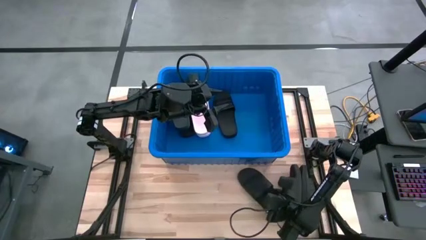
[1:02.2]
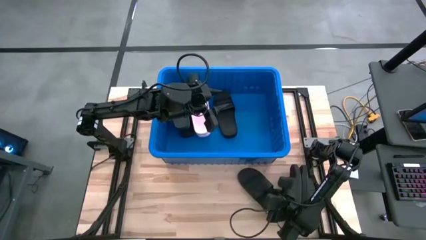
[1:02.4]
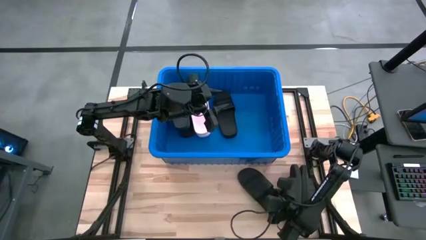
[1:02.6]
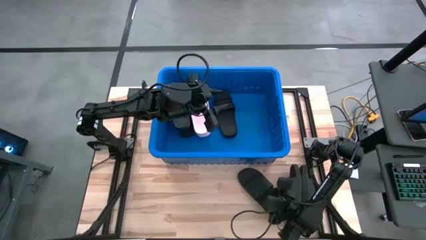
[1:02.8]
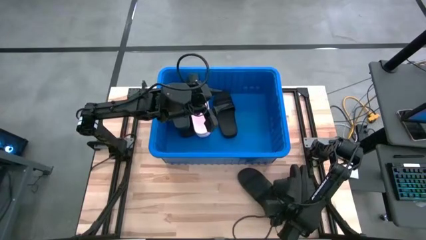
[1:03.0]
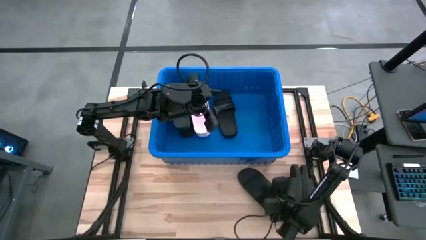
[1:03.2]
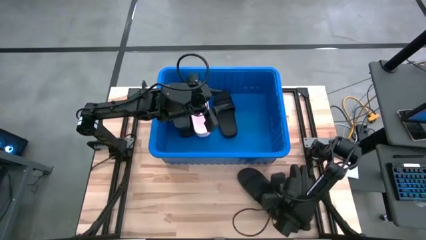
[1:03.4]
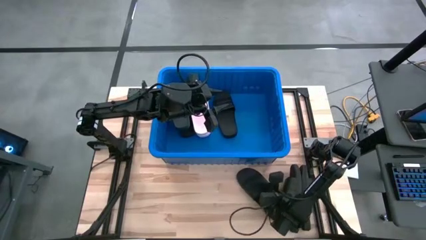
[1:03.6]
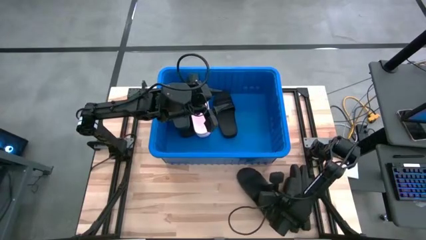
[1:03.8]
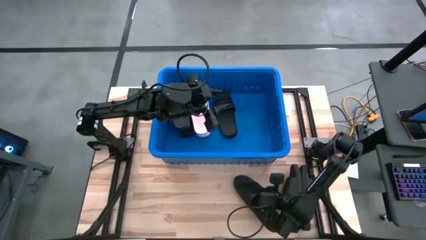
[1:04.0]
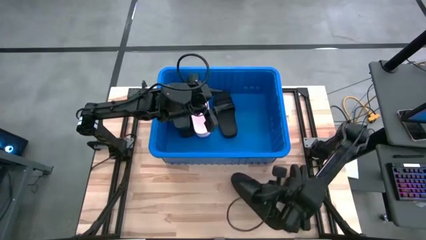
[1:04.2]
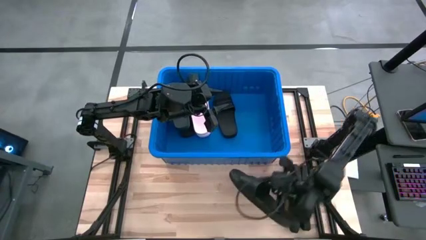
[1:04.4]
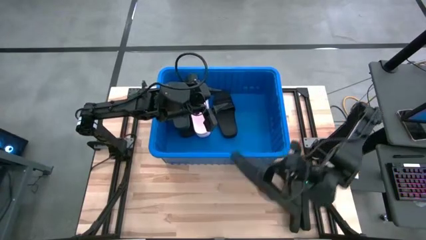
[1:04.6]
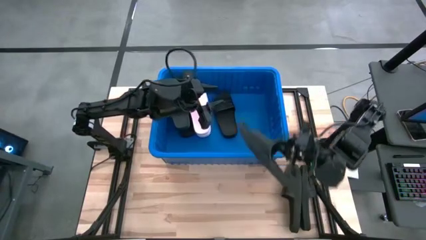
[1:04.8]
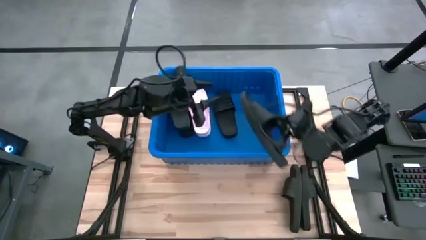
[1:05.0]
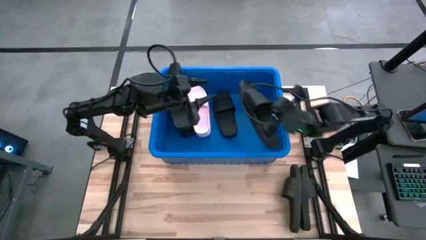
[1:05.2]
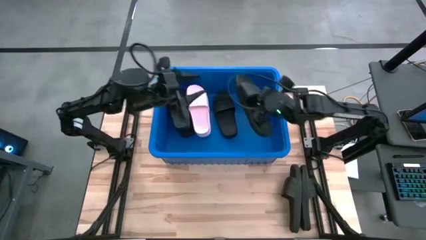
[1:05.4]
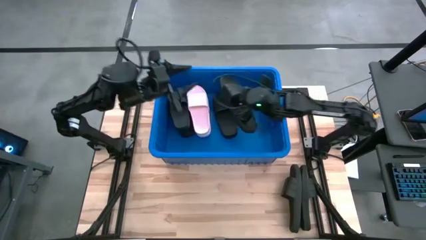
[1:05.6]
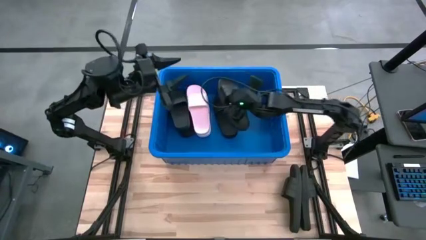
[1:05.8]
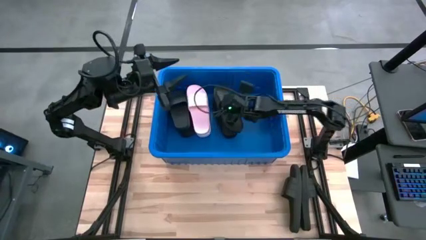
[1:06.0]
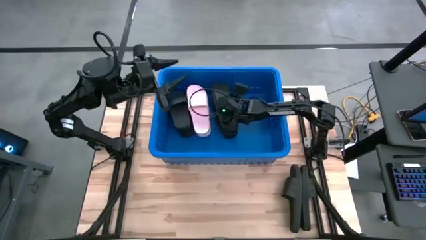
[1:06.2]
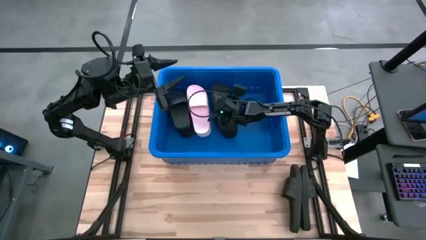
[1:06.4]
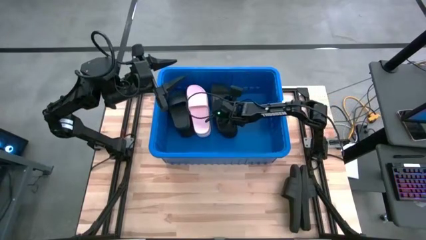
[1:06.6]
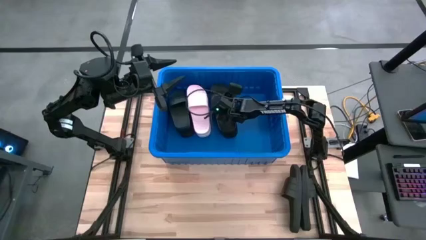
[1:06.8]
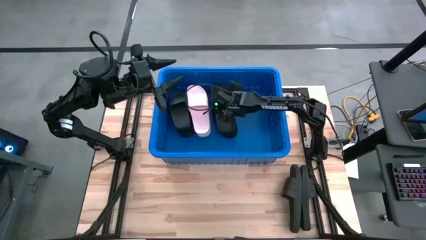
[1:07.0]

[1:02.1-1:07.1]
Task: Pick and place slides into bin
Put the left black slide into the bin

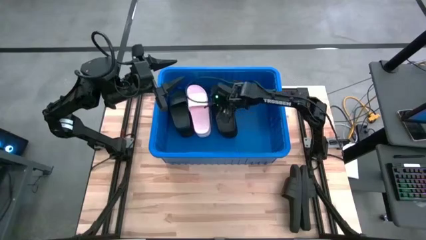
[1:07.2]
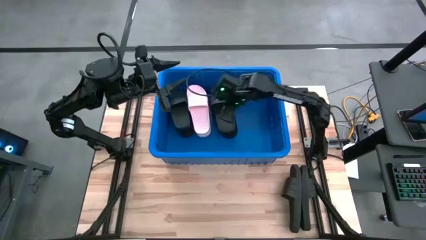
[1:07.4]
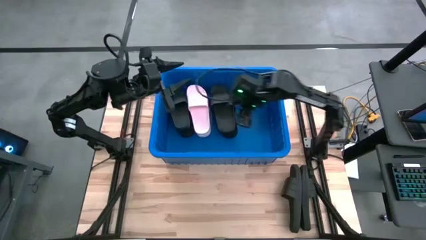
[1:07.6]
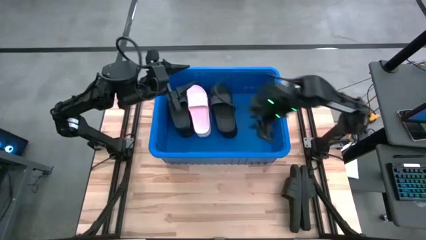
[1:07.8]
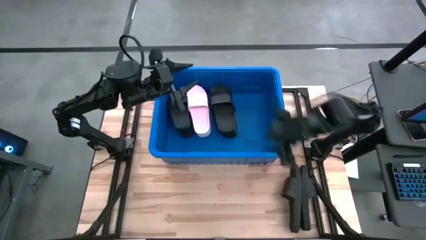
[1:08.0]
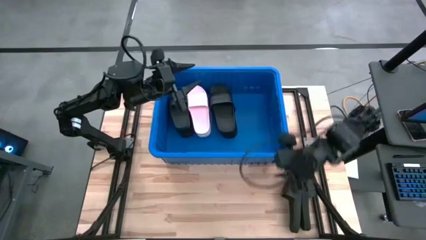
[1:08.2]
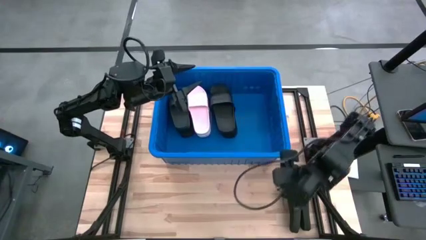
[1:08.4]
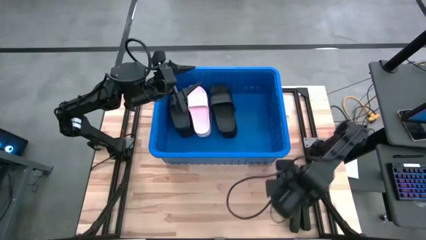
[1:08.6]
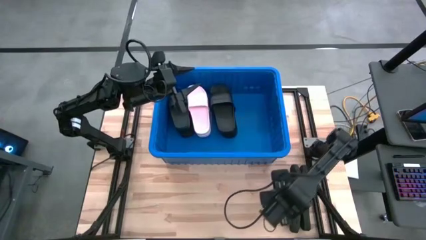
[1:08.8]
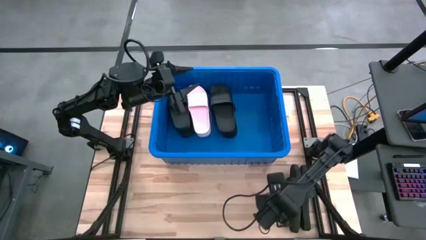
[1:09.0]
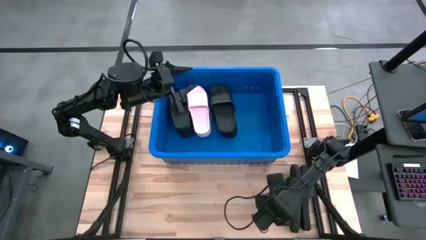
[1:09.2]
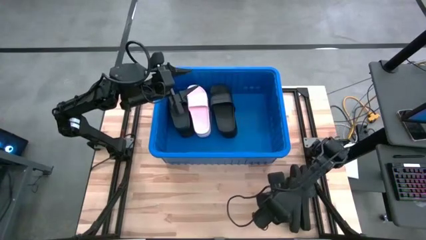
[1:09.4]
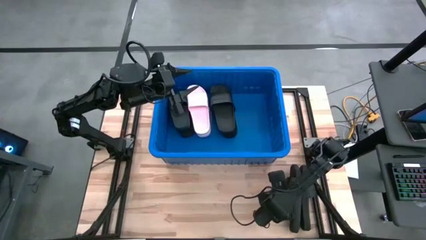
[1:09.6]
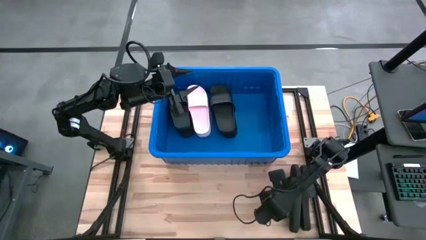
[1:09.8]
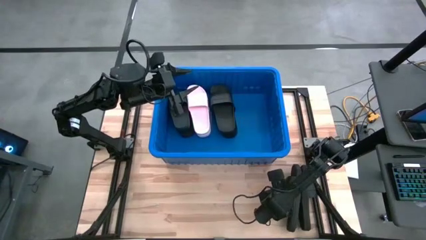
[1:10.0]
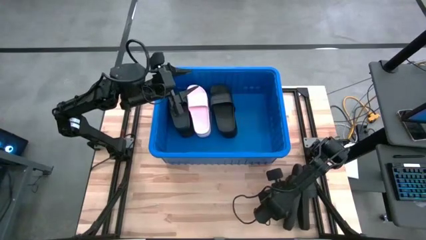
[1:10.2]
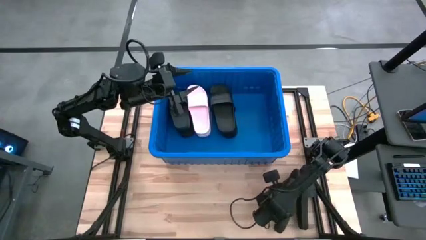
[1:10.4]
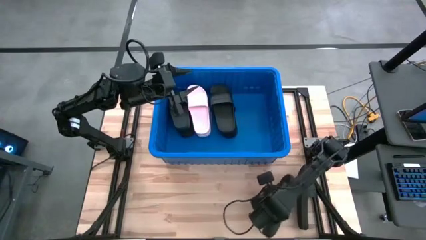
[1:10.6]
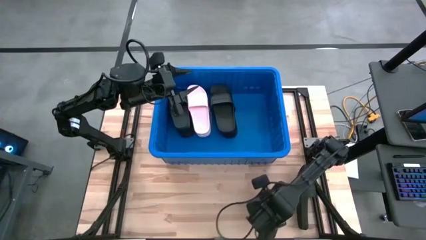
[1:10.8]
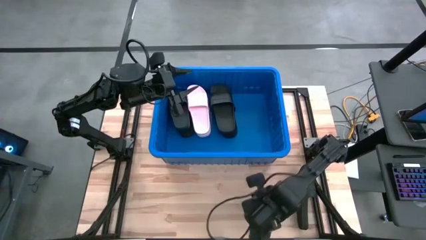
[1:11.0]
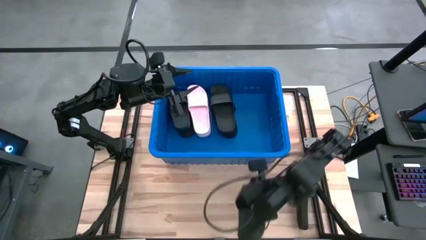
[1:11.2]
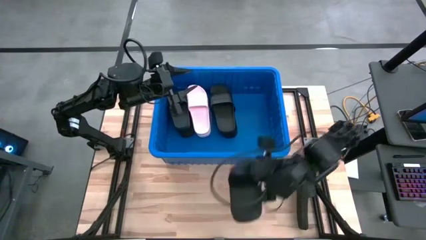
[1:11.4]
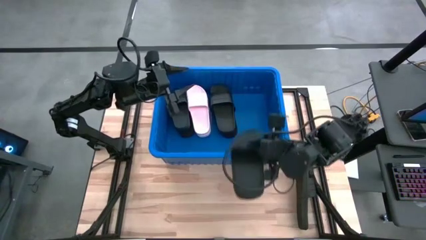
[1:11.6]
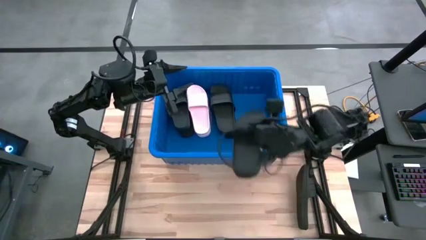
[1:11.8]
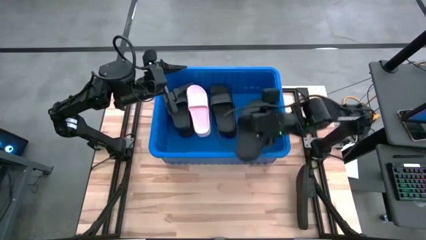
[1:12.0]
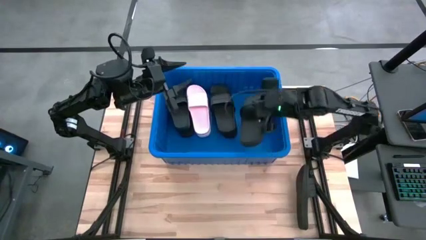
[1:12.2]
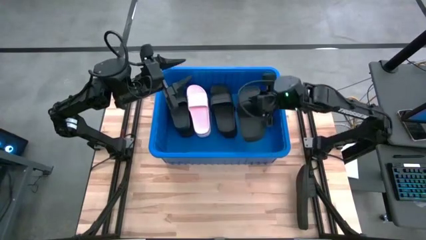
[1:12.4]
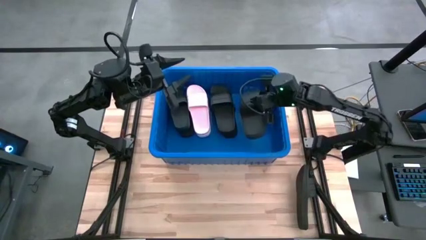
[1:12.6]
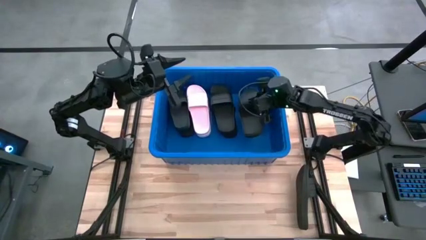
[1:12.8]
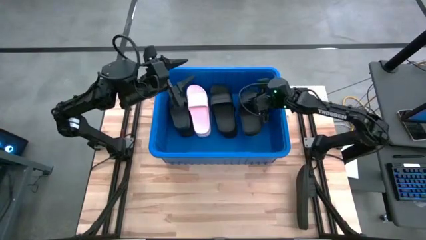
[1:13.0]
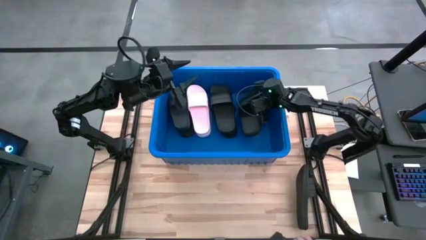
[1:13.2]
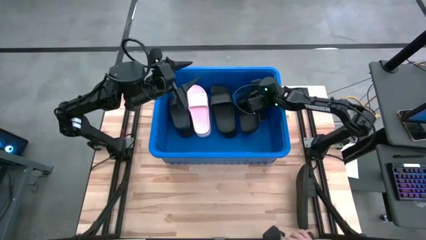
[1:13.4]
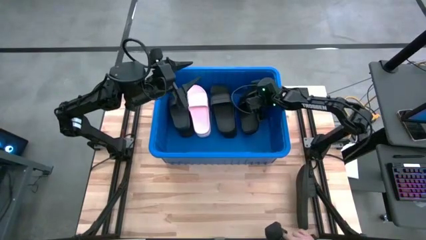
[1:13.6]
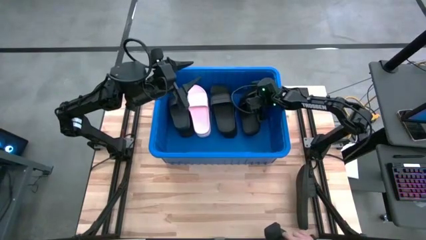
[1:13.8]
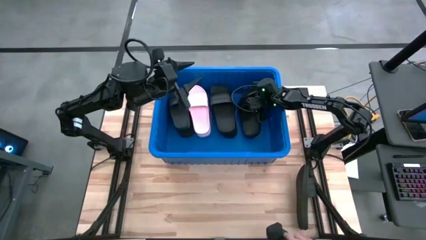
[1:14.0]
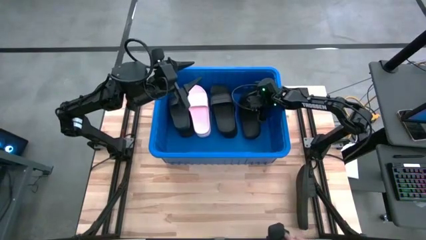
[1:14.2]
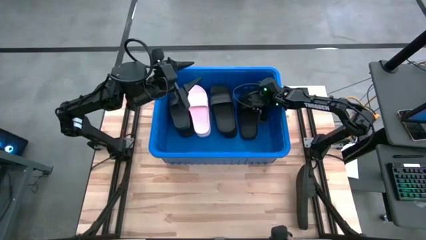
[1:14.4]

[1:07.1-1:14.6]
Put the left black slide into the bin

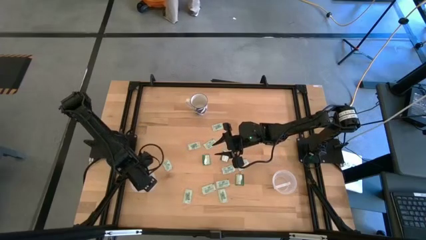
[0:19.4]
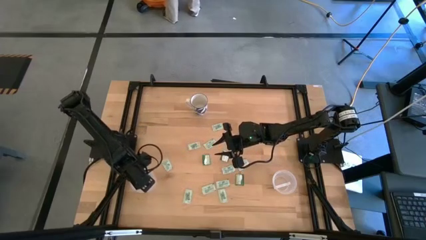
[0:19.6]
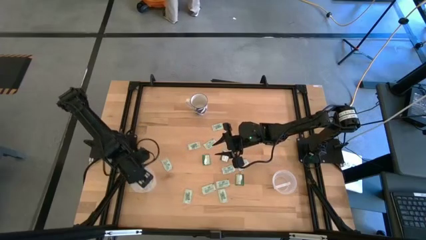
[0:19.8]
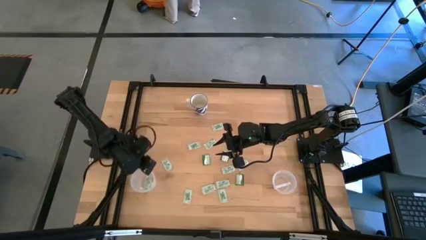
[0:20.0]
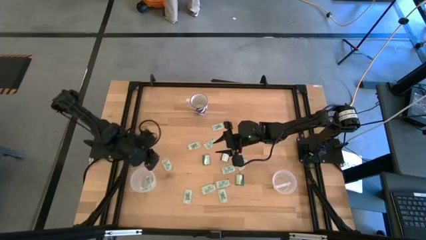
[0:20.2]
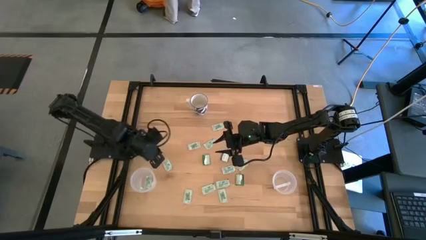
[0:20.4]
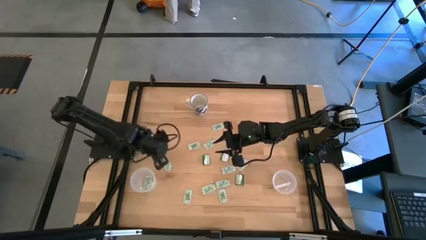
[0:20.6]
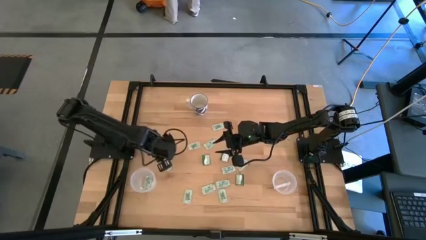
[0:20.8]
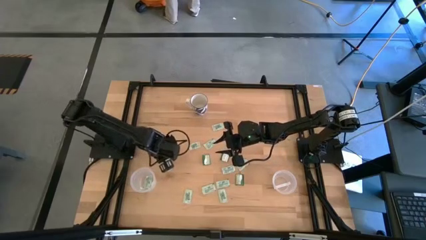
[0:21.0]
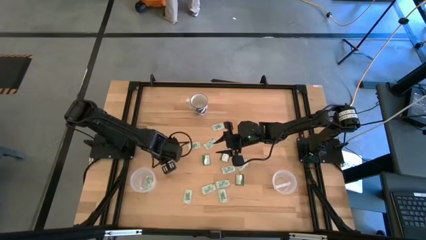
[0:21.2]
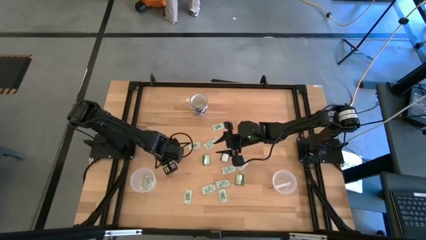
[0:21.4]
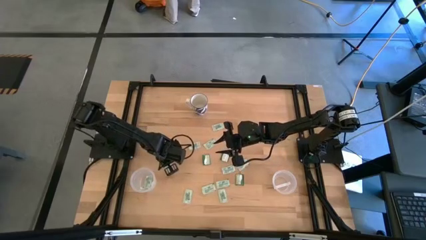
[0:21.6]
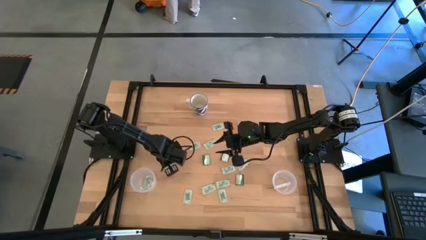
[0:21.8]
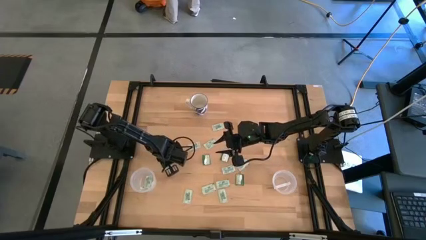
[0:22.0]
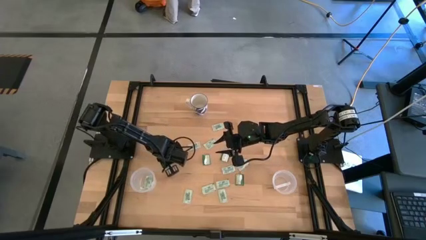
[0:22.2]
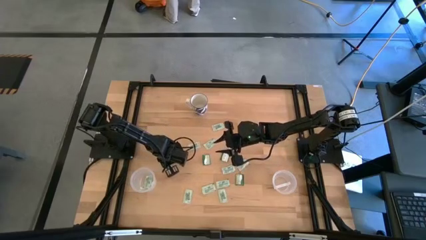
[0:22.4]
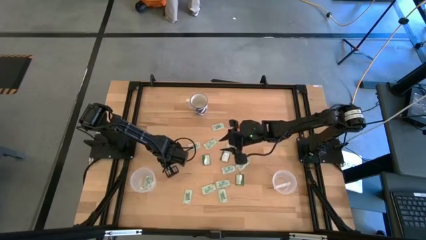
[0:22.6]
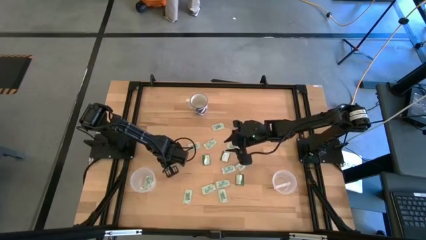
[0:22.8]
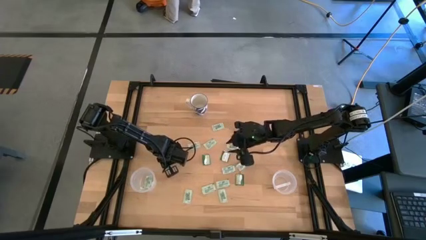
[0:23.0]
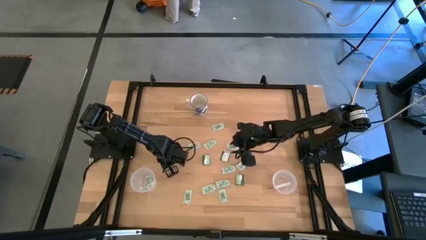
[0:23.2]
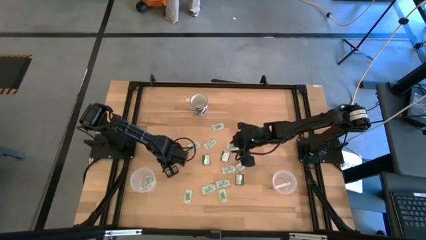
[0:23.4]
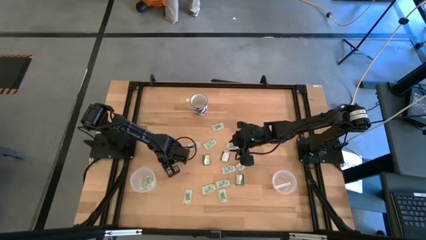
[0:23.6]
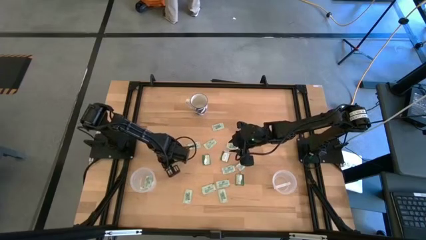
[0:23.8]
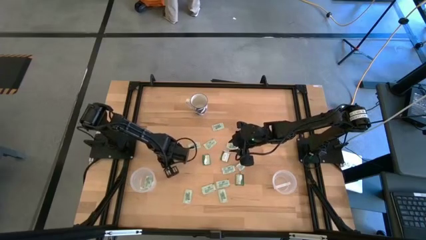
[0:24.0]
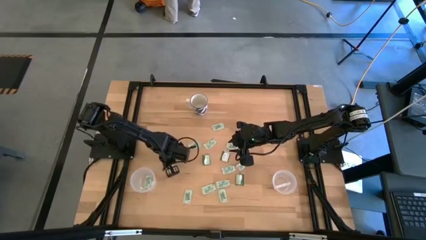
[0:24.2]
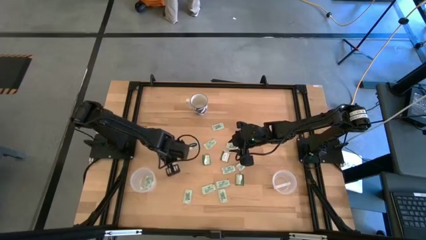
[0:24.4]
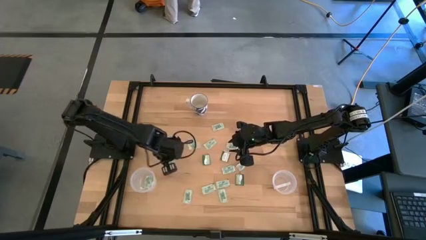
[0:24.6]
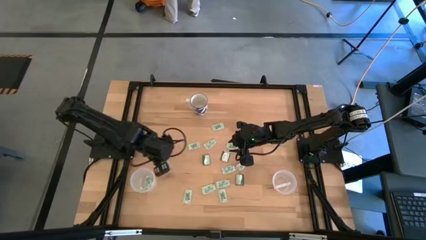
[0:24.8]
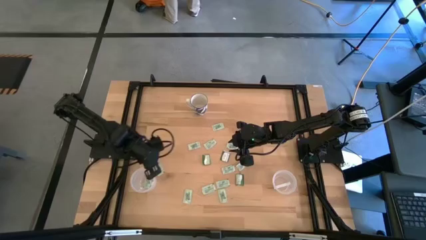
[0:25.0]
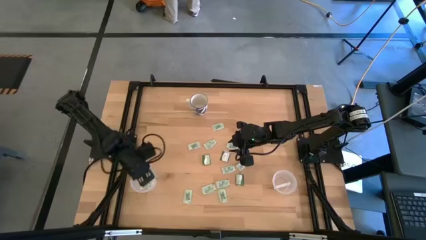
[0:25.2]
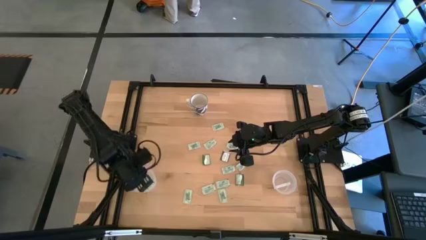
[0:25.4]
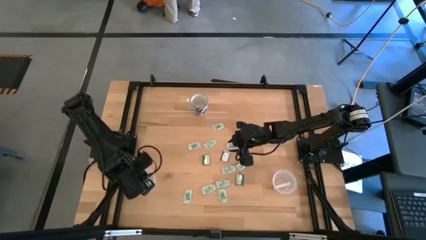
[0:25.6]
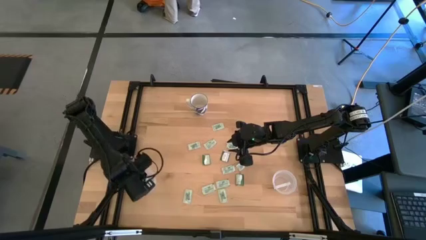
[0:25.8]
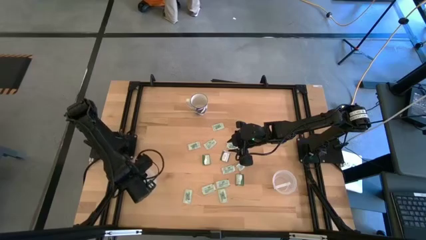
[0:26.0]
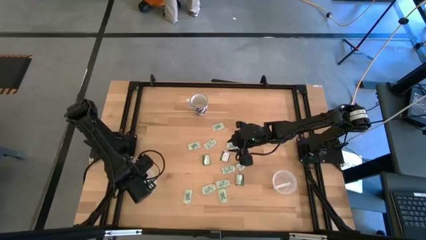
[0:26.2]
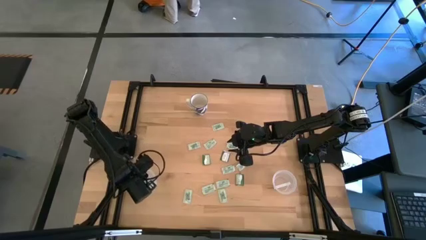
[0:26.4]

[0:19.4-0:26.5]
Task: Pick and place Stevia / Truvia into bins
Put the light green stevia packet into the left transparent container
